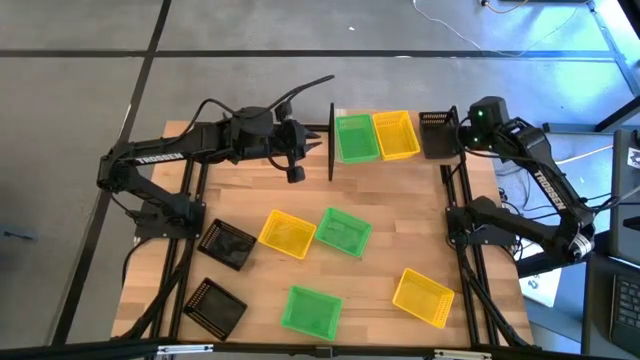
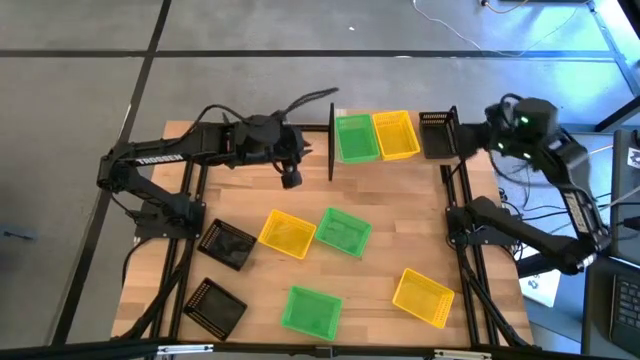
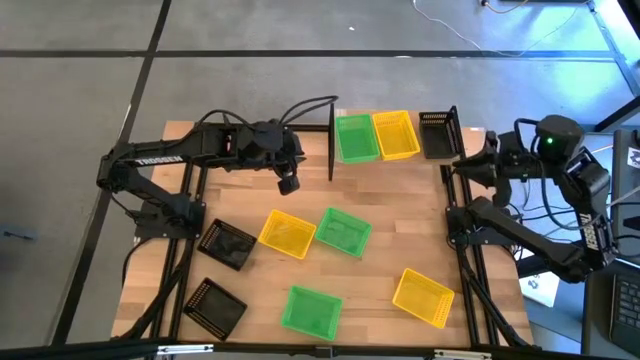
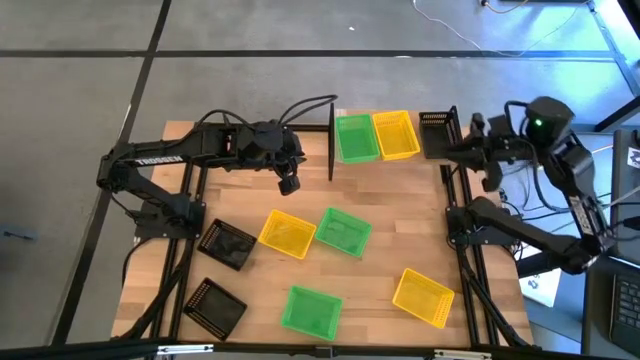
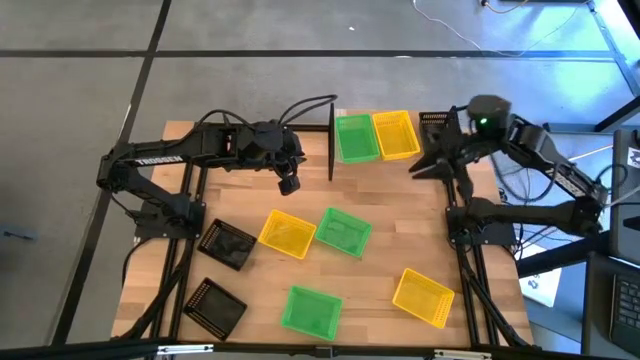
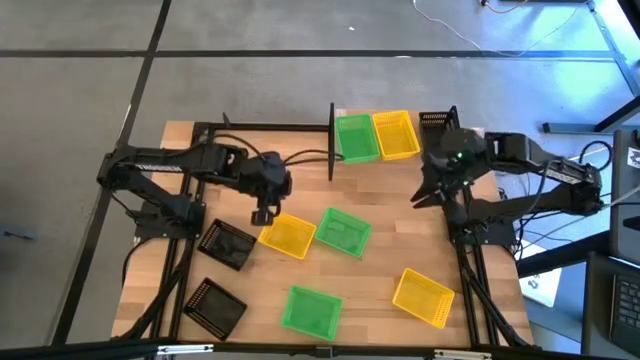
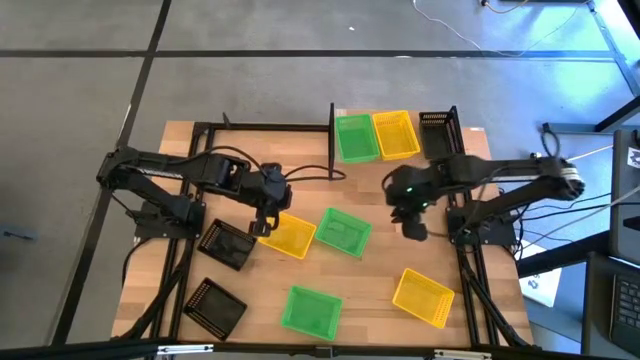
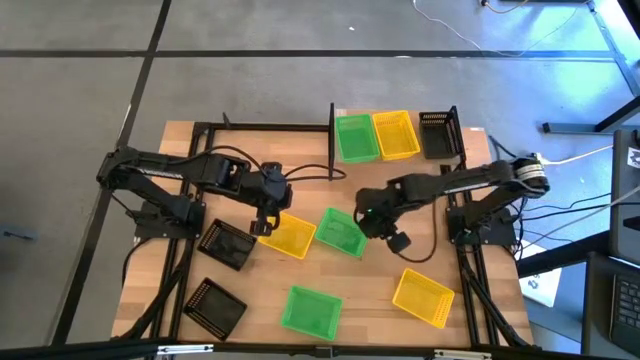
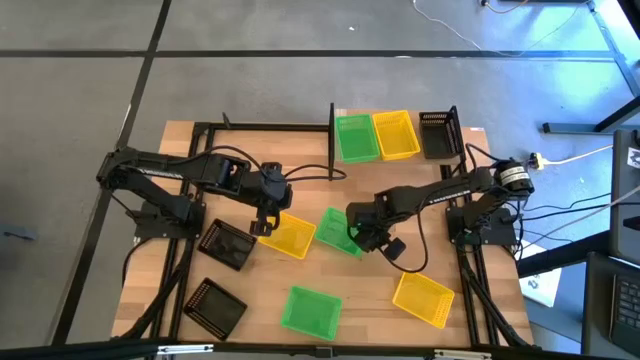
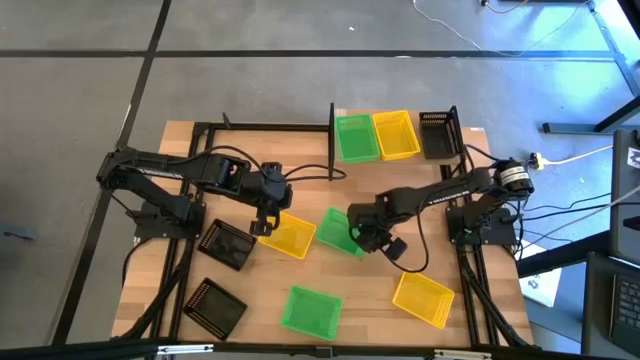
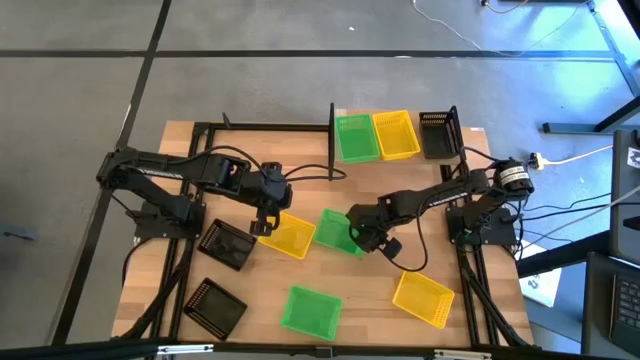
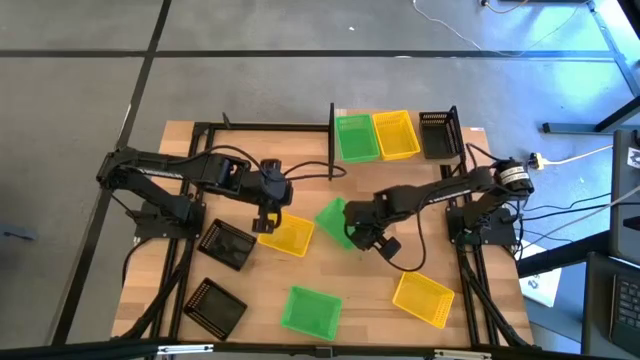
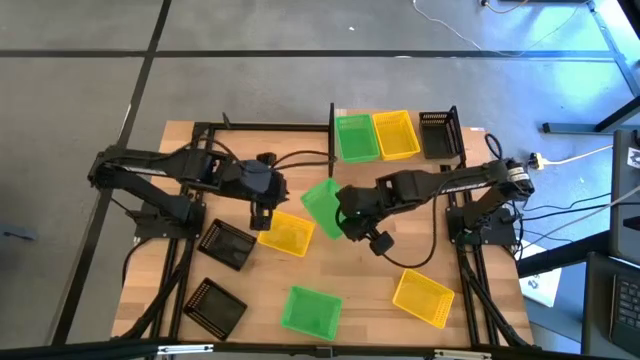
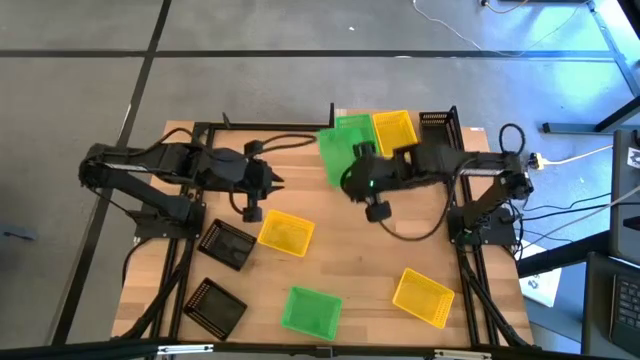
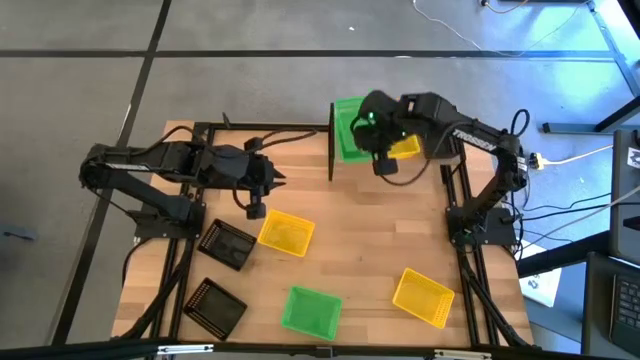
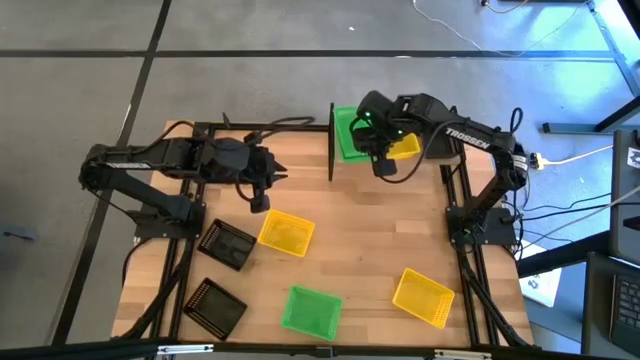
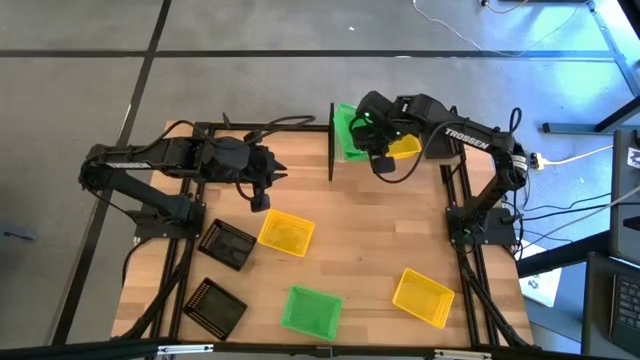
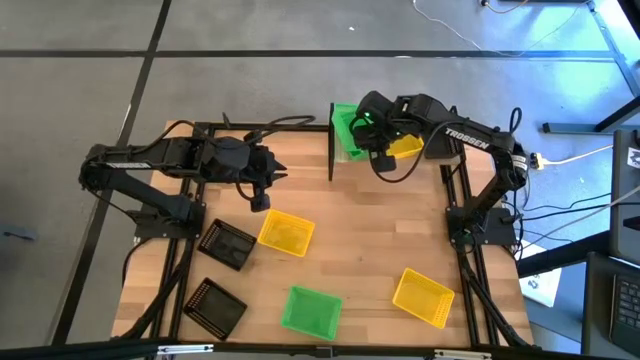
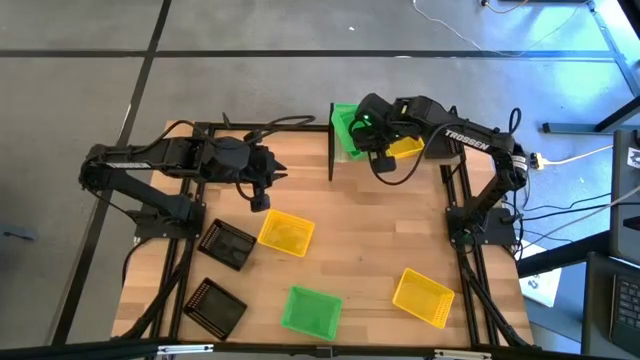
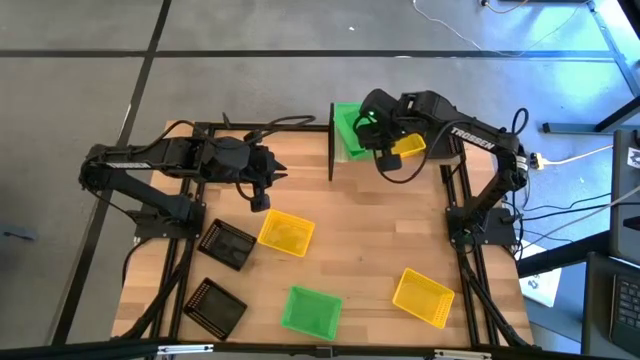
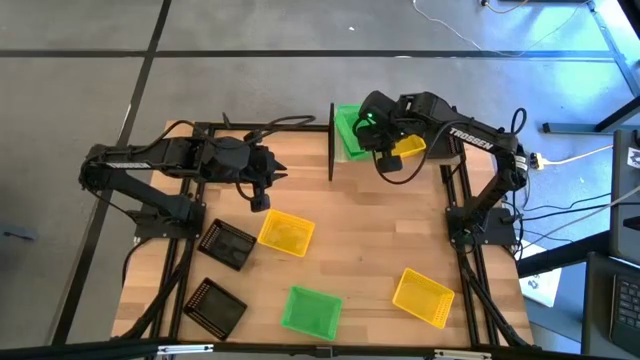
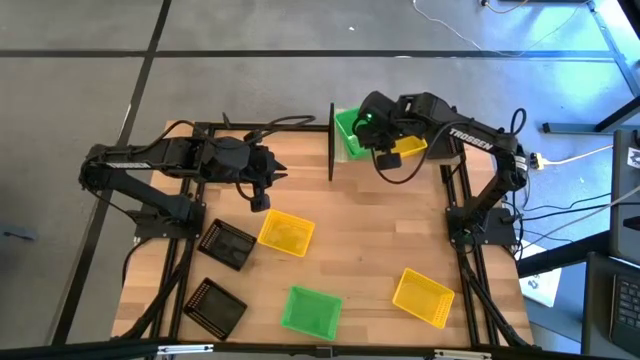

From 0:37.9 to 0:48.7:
Task: Stack baskets on shelf by color
Stack the top green bin on the green bin on the shelf

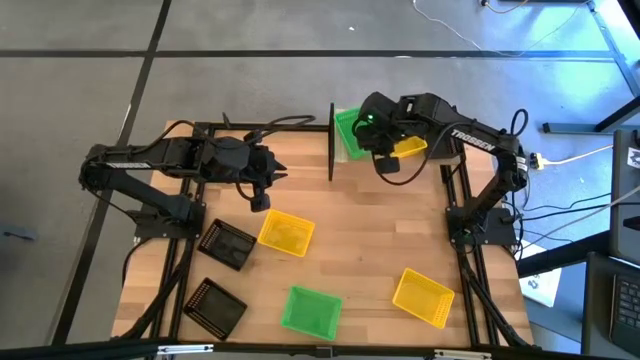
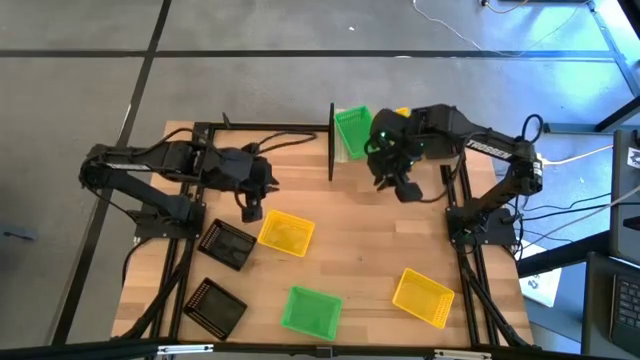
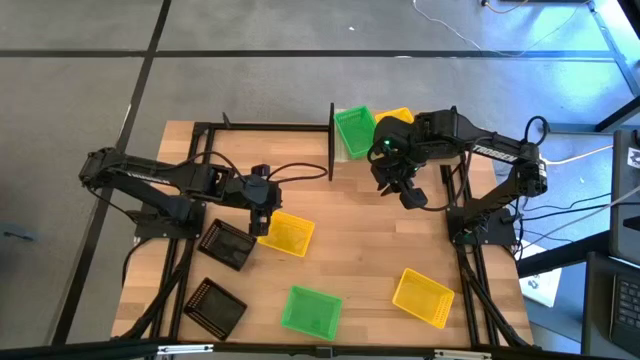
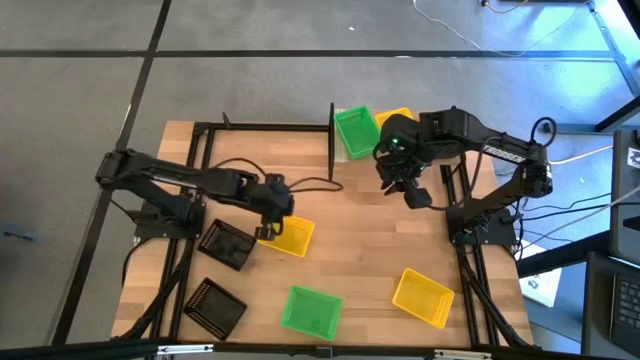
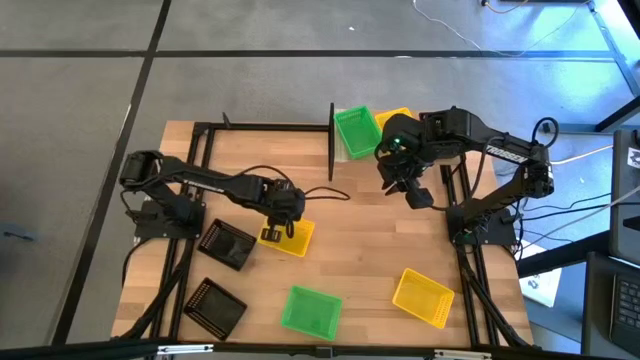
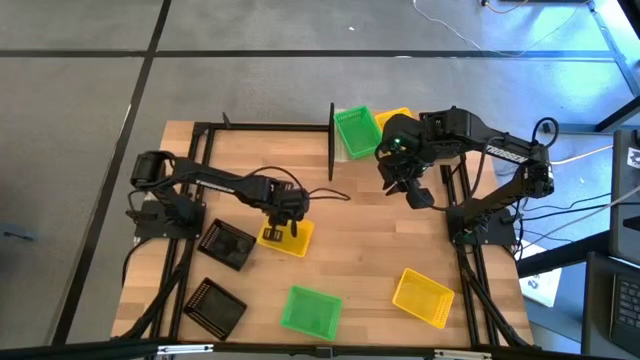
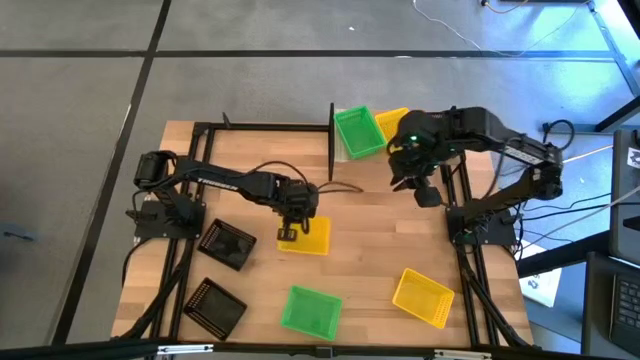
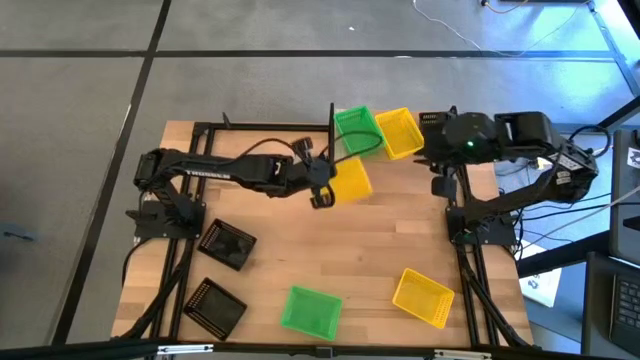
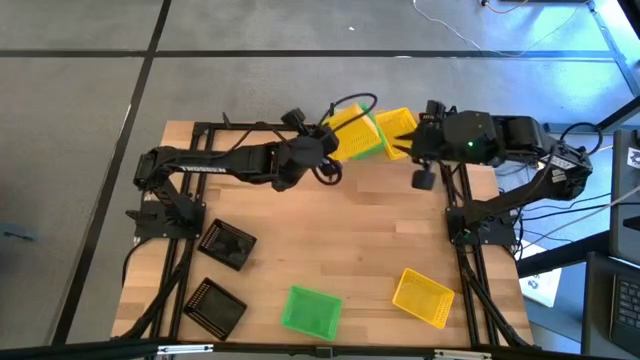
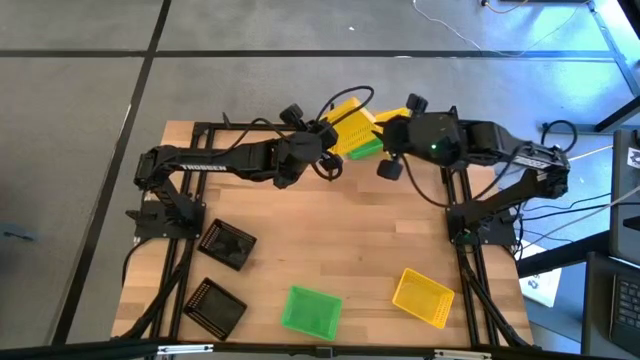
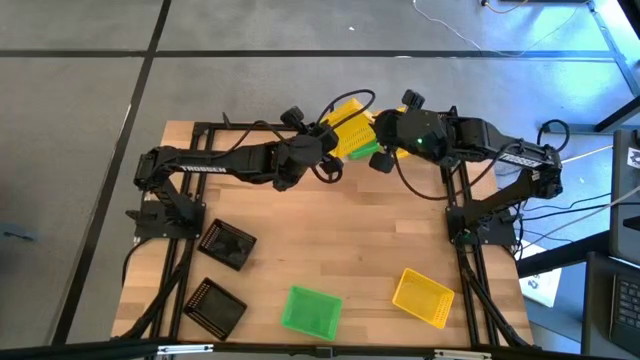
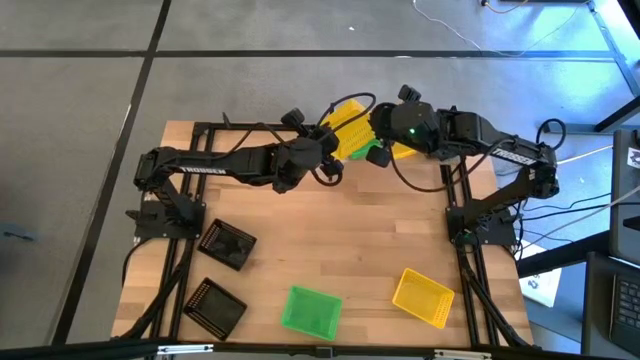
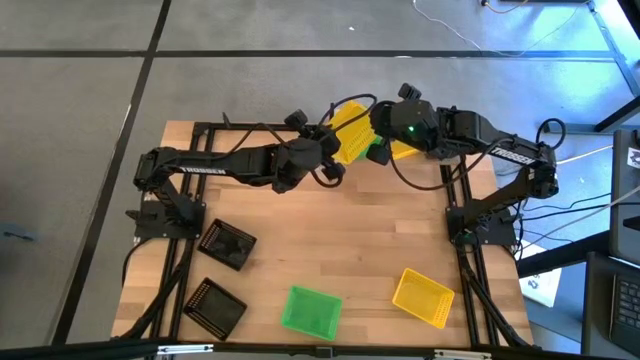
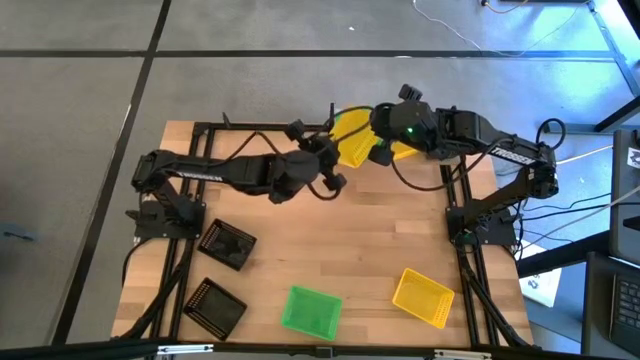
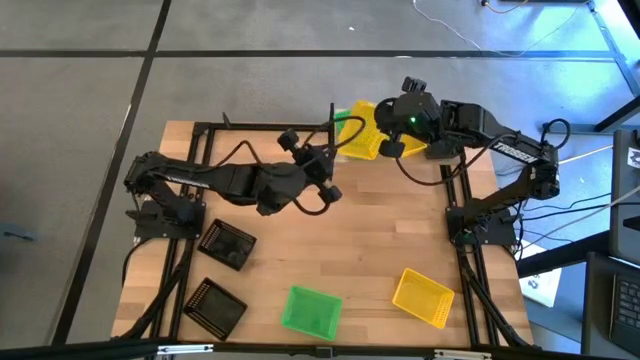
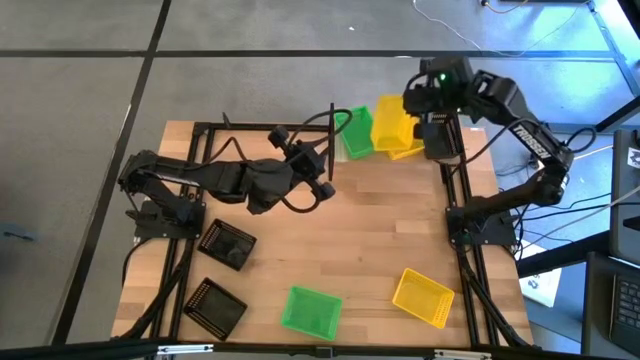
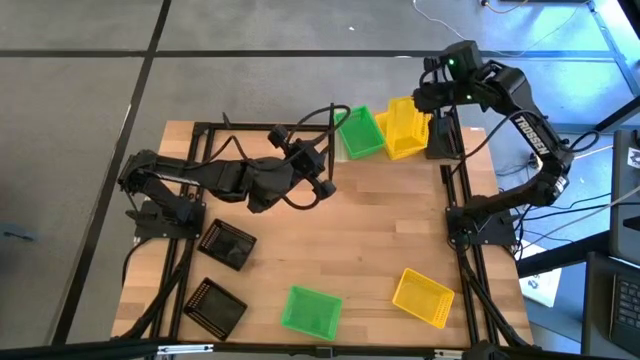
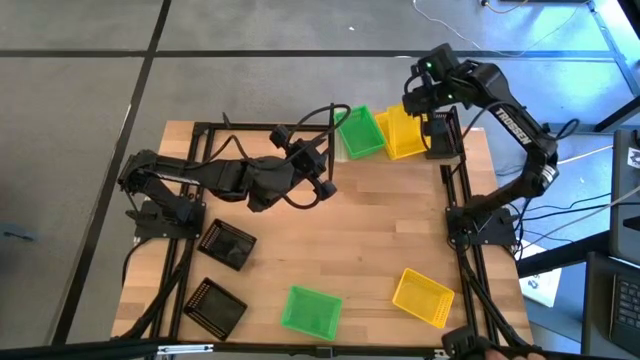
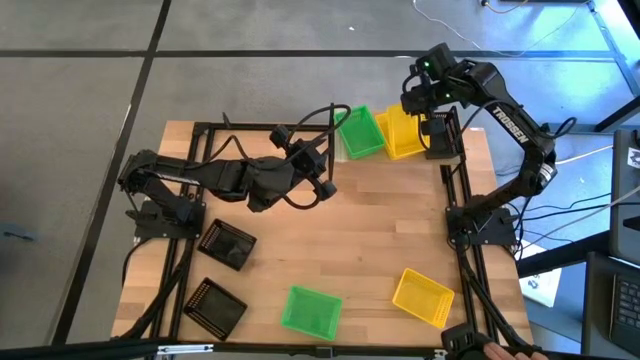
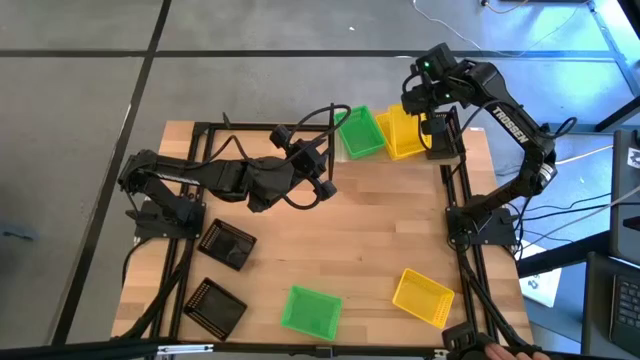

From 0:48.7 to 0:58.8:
Stack the top yellow bin on the yellow bin on the shelf
